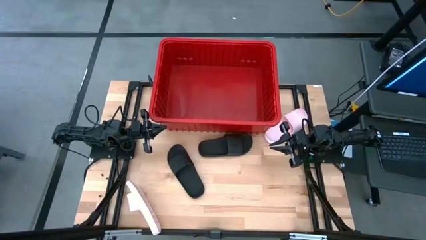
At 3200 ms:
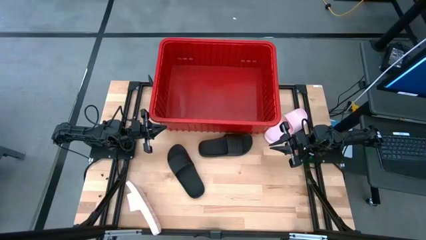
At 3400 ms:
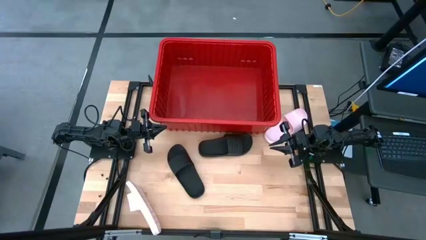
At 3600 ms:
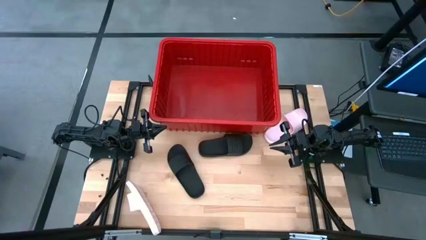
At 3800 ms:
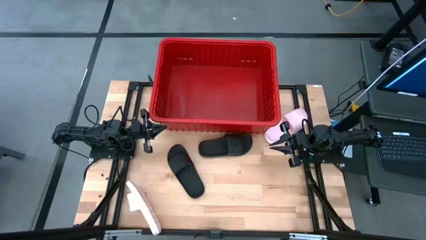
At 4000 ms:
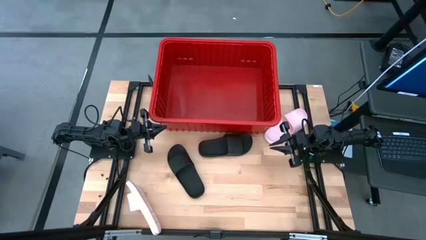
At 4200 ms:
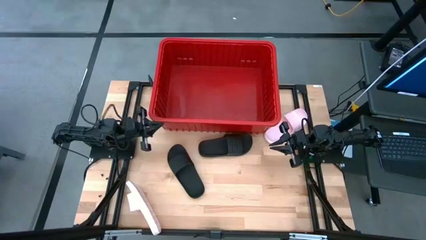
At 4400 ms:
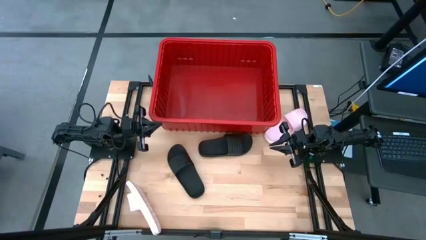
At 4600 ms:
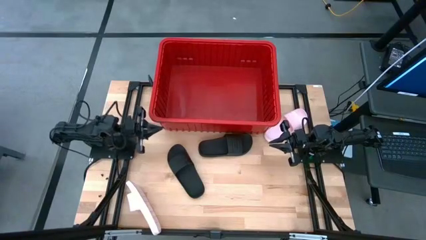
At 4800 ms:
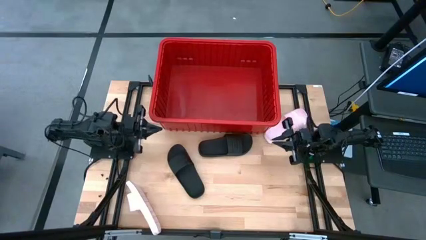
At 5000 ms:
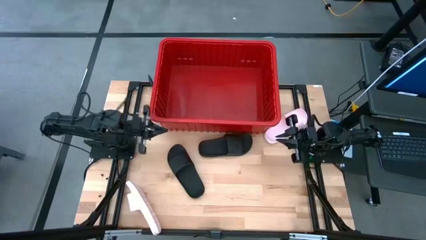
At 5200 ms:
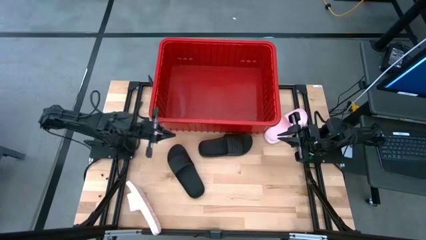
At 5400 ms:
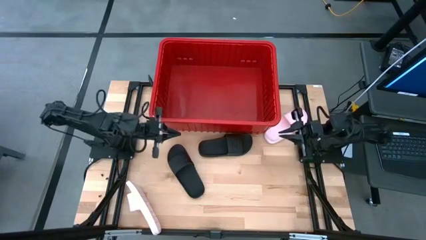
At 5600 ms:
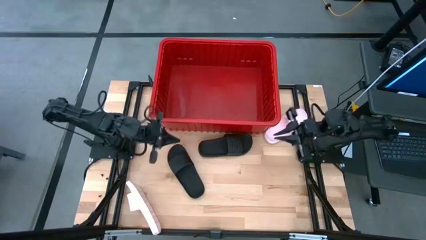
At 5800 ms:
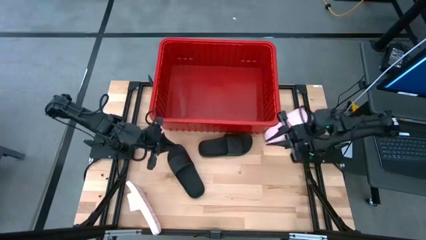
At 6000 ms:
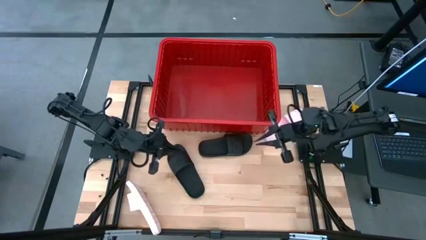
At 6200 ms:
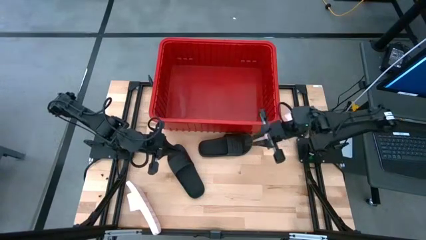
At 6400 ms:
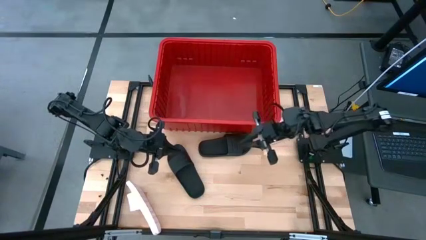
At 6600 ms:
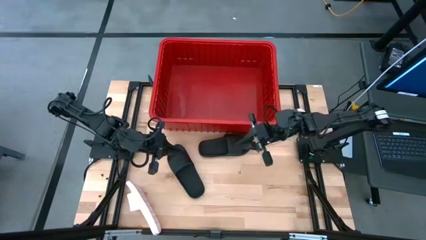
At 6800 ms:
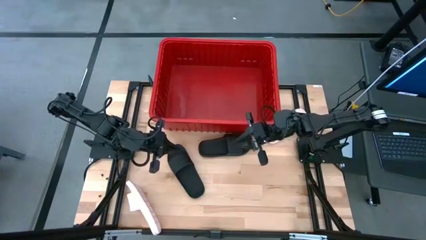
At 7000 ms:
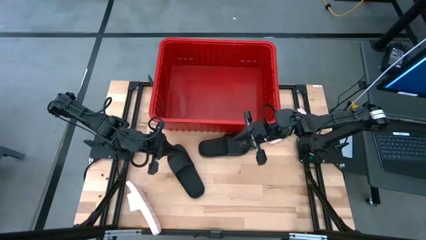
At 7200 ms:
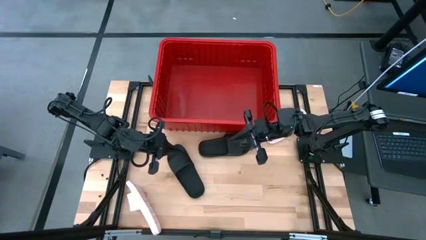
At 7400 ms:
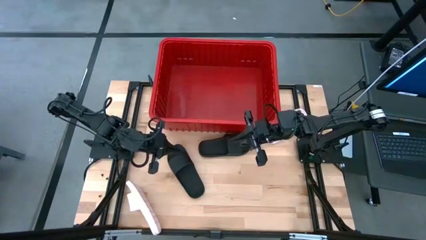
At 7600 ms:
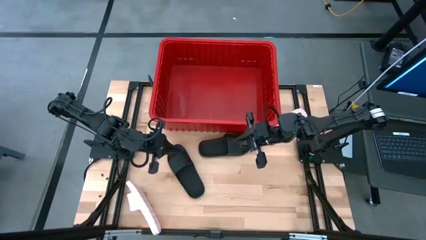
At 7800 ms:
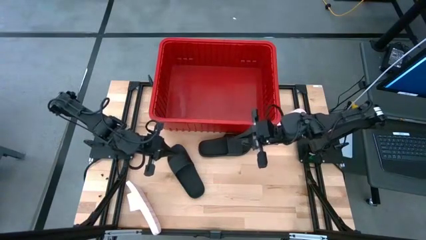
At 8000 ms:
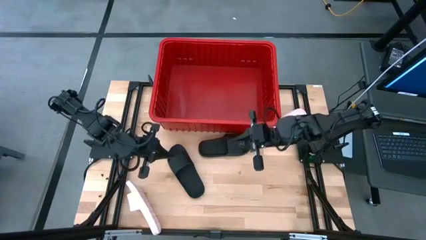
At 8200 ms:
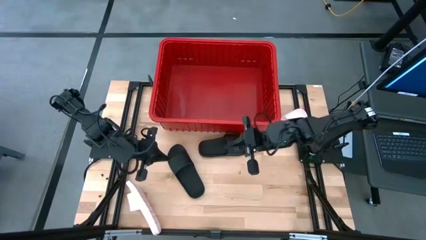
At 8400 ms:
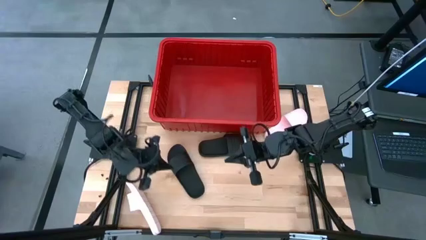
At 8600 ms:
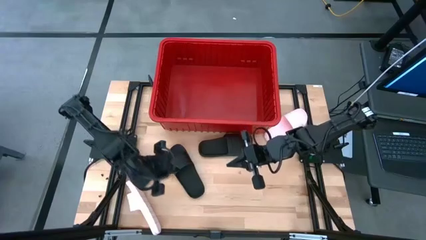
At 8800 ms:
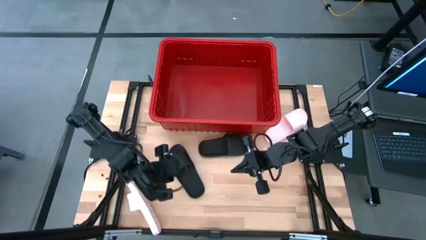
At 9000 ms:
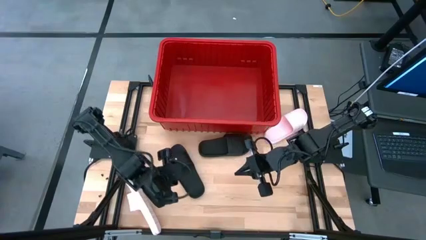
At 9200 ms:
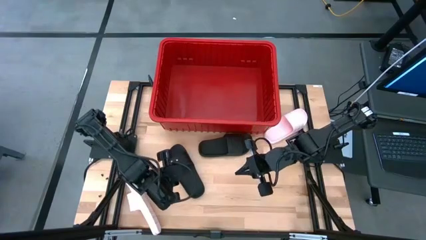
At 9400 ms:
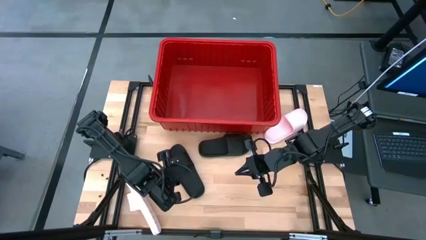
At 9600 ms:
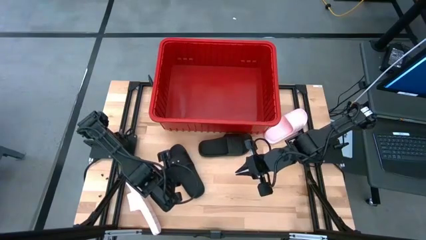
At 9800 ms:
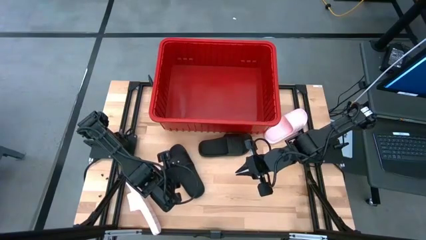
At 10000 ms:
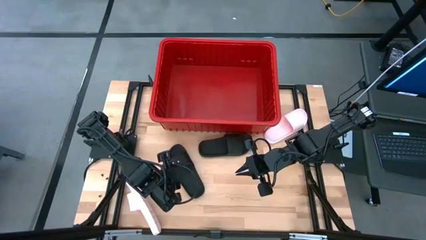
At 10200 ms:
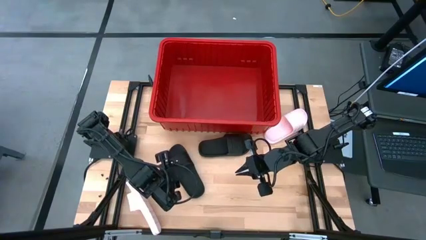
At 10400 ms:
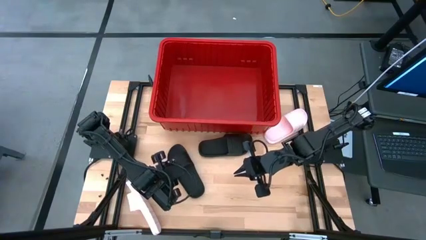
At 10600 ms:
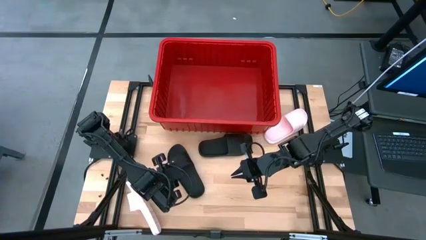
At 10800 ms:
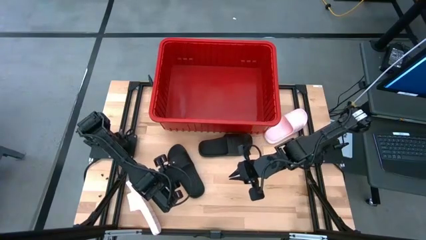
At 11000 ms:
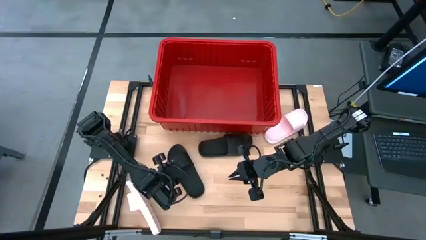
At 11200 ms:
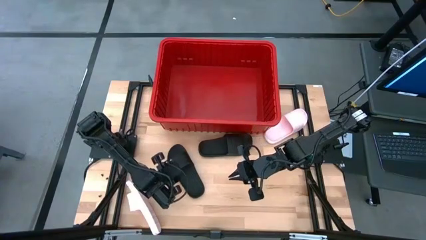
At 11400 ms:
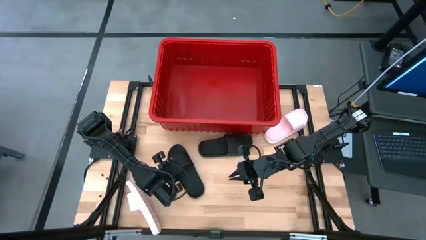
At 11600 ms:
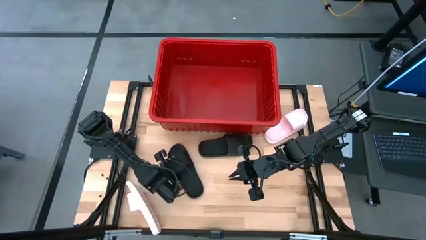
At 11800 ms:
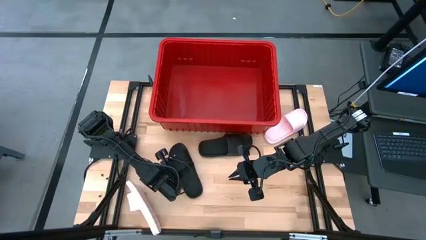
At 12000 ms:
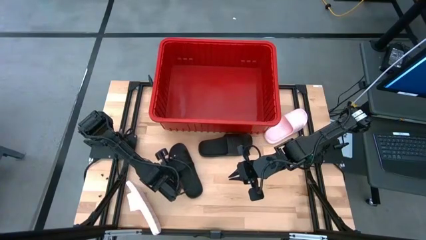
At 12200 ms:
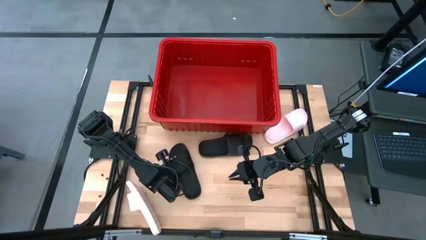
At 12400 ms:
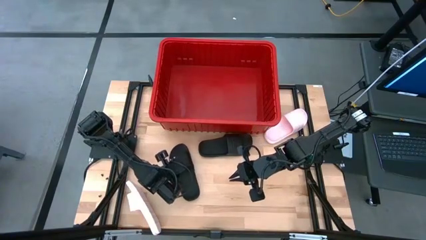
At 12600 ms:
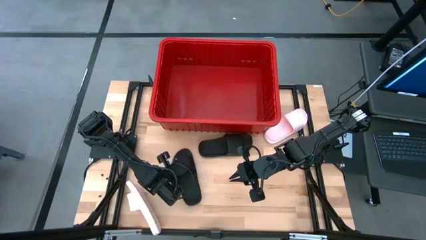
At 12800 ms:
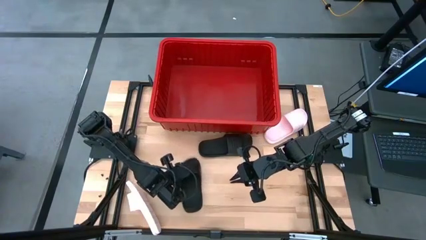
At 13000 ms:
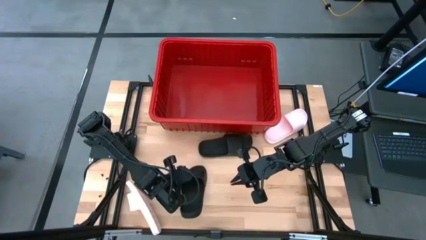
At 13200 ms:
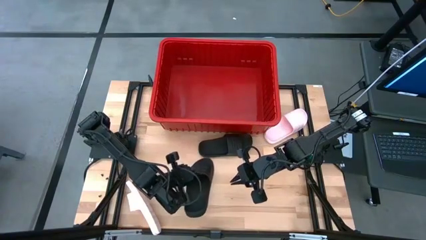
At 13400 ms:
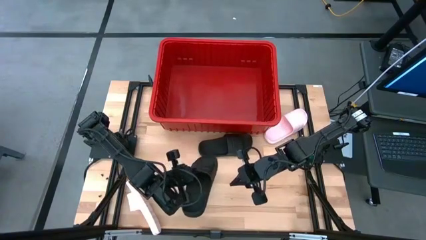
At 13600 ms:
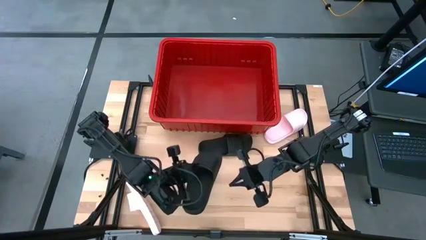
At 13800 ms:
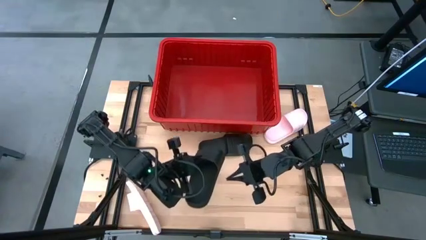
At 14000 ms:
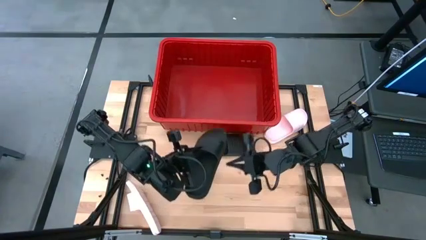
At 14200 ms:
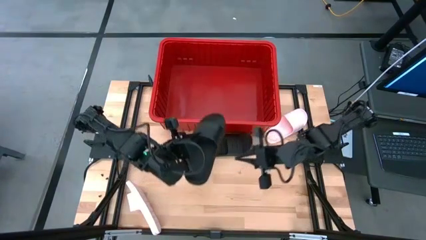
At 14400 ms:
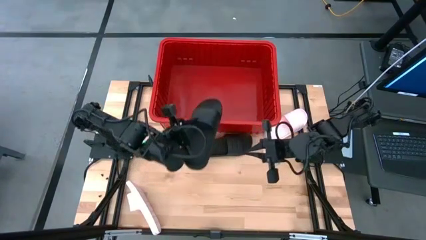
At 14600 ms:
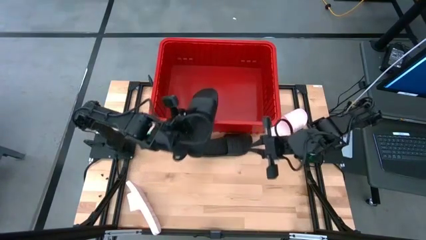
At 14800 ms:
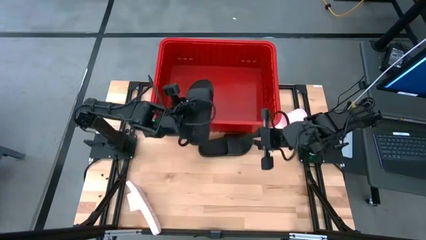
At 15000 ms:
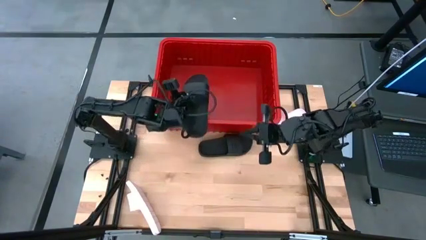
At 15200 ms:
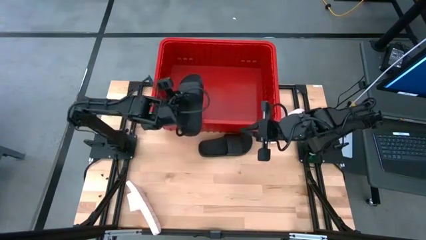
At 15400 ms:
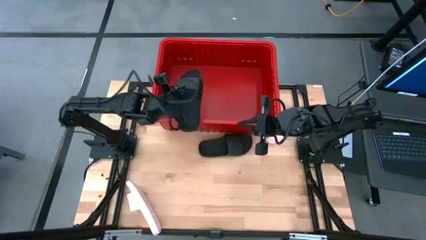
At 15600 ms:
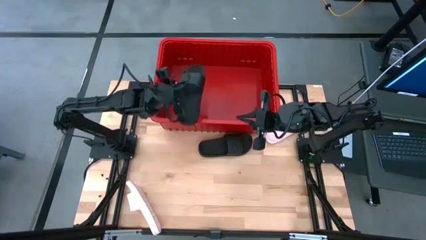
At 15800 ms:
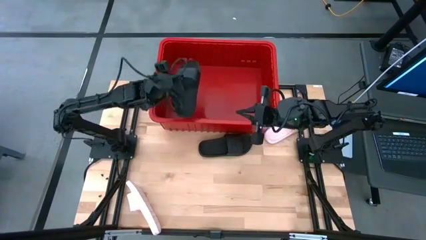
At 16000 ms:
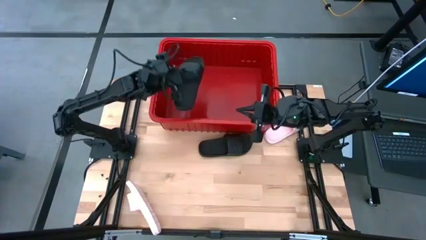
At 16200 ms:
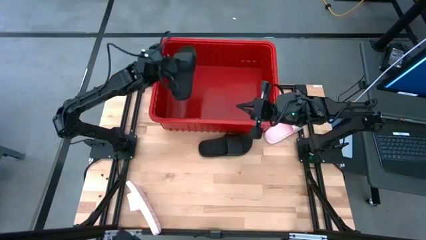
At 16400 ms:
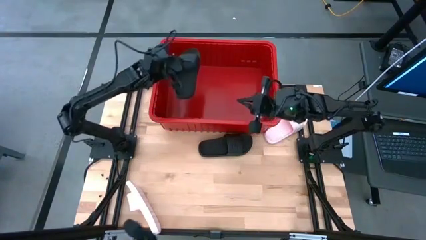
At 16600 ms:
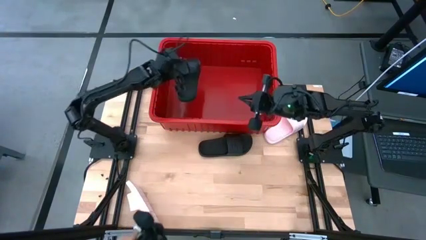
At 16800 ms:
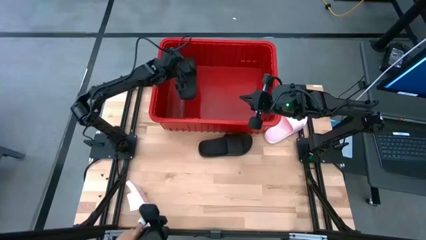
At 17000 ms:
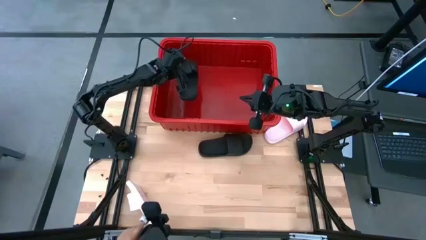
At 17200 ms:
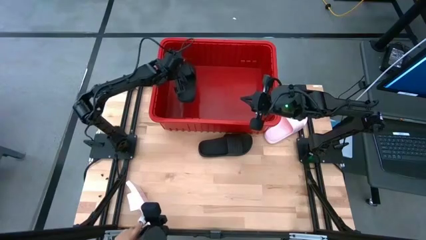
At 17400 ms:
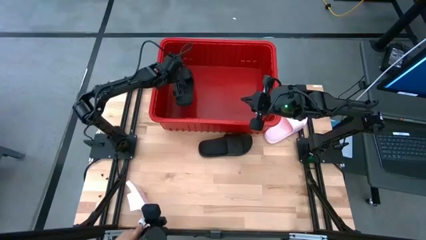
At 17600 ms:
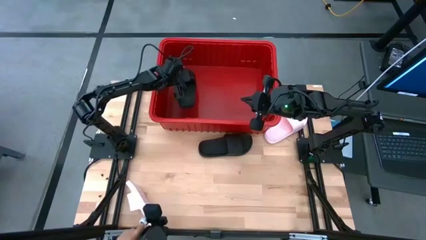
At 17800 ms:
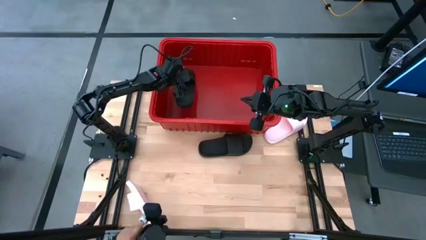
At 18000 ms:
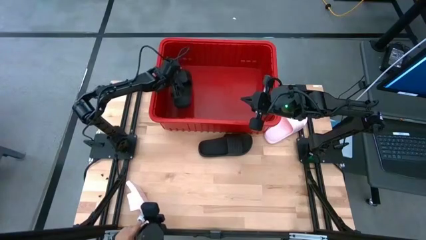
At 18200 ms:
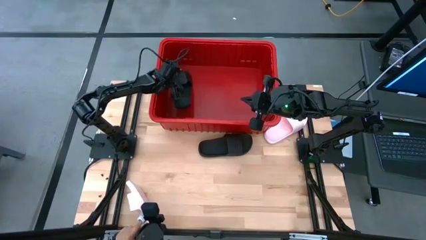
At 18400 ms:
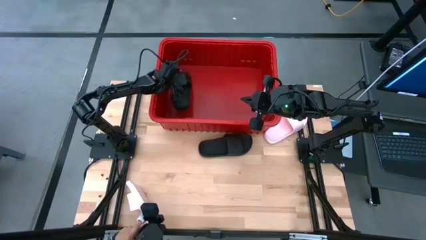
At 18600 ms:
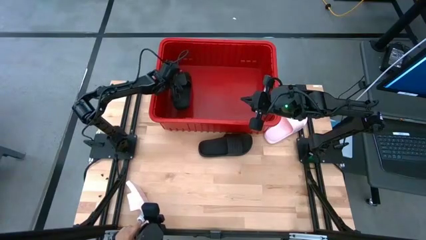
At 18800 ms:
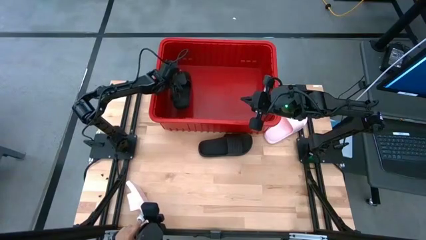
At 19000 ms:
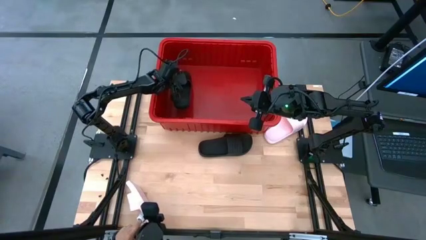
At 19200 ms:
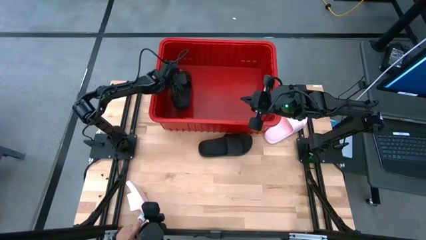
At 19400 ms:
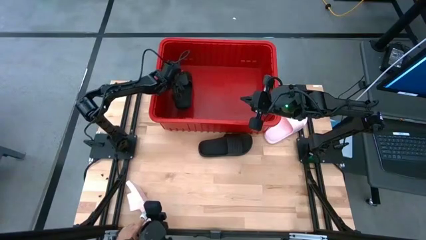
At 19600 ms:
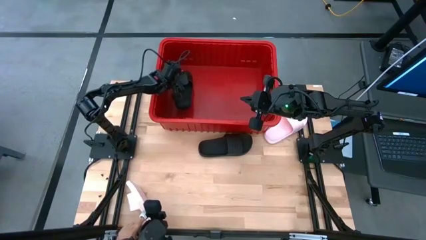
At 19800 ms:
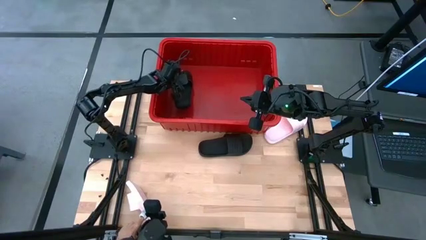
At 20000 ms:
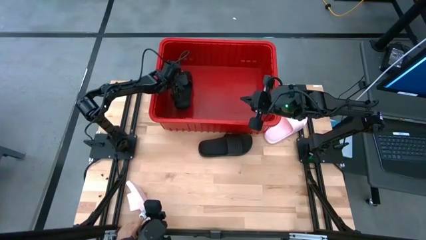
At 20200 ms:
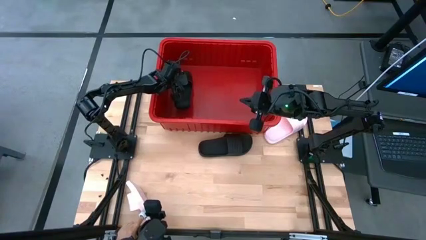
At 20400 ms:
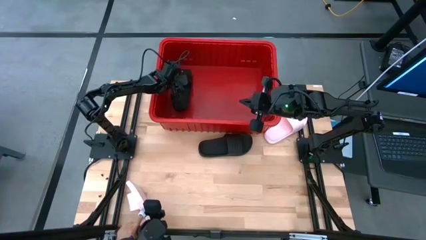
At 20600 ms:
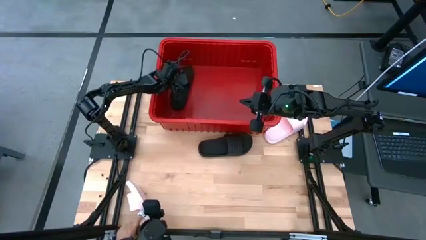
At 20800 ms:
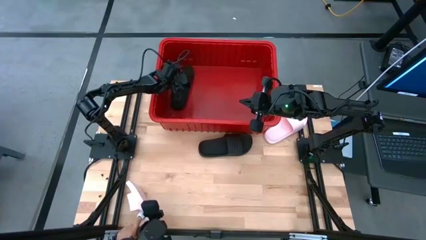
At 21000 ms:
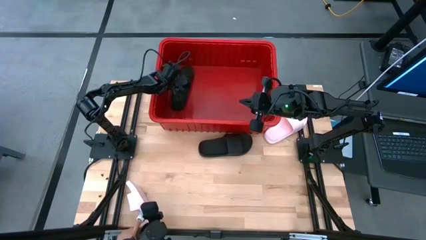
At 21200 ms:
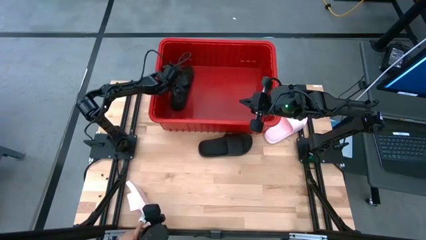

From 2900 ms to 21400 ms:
Task: Pick and place slides into bin
Put the black slide into the red bin
